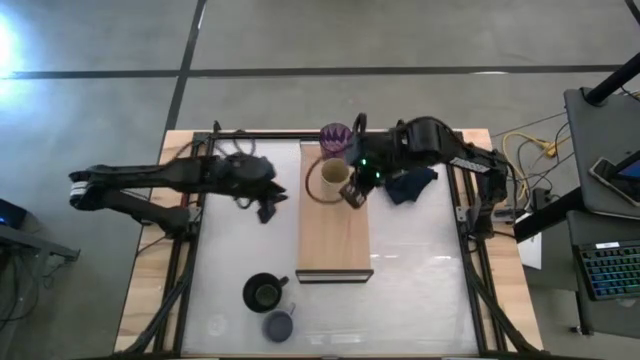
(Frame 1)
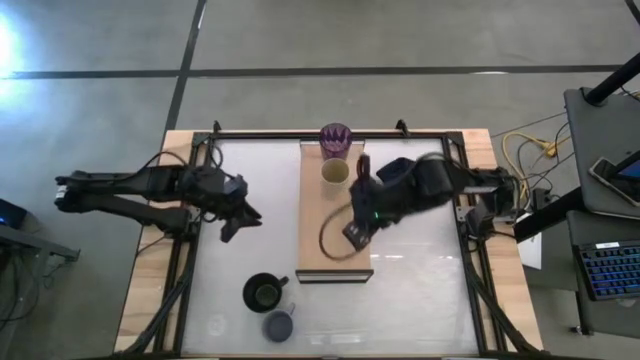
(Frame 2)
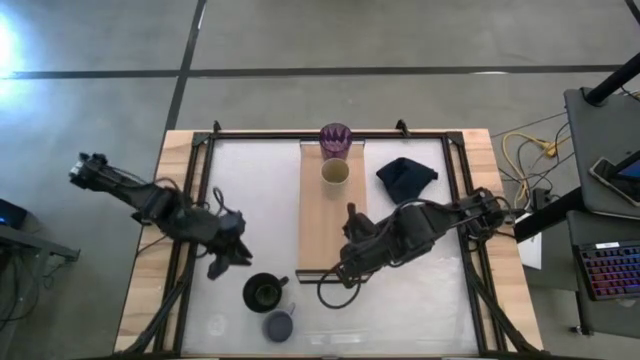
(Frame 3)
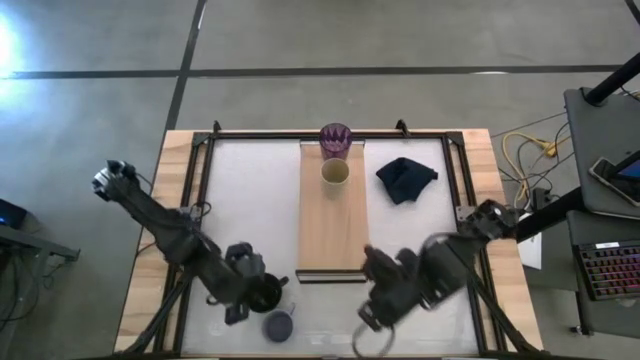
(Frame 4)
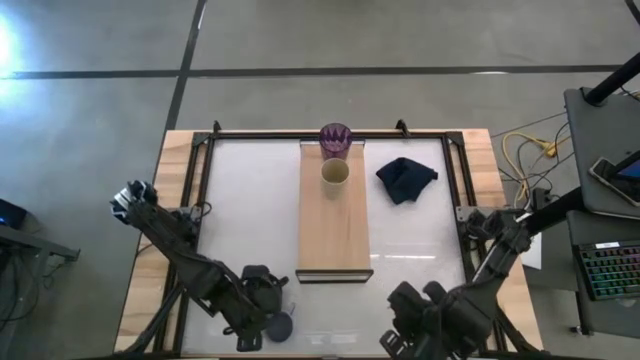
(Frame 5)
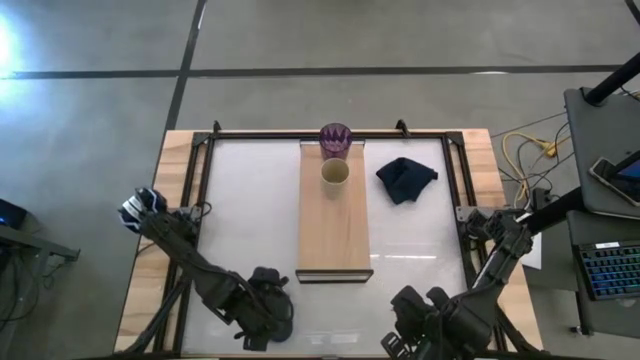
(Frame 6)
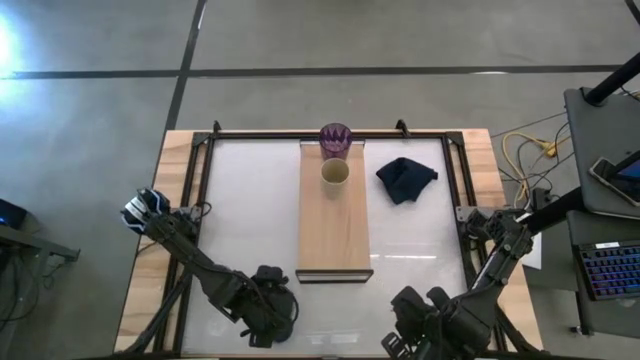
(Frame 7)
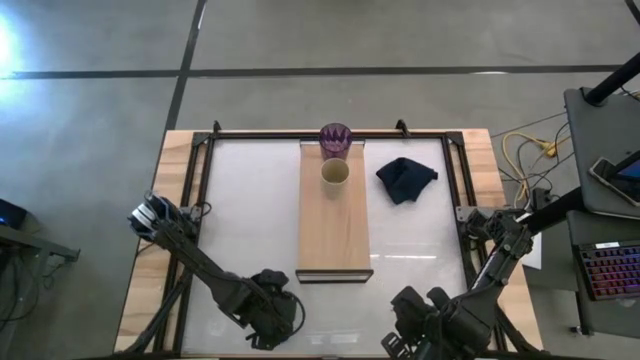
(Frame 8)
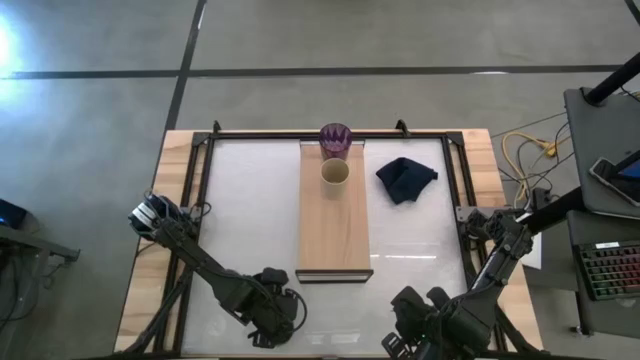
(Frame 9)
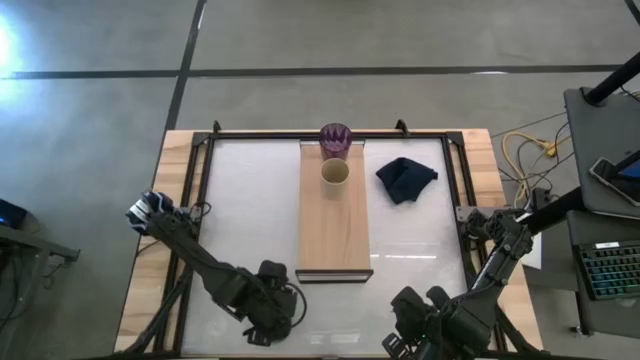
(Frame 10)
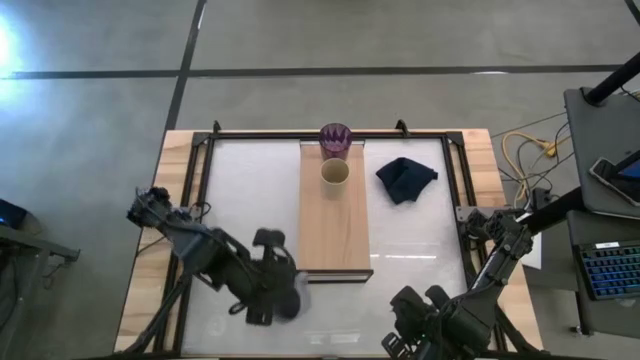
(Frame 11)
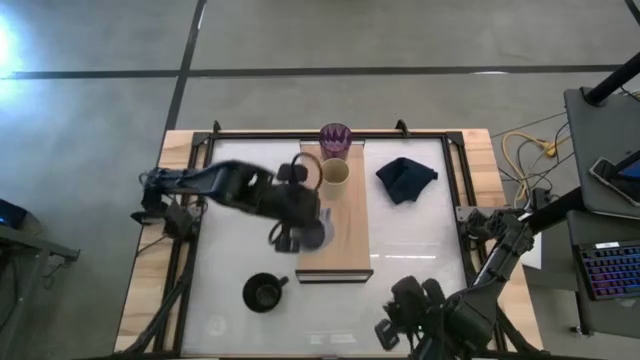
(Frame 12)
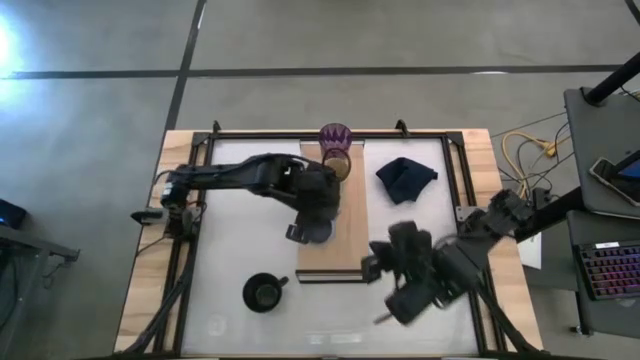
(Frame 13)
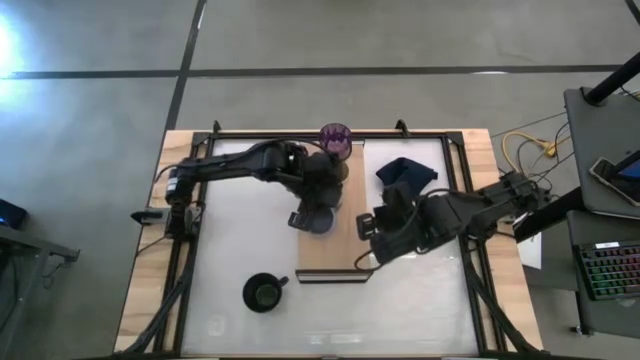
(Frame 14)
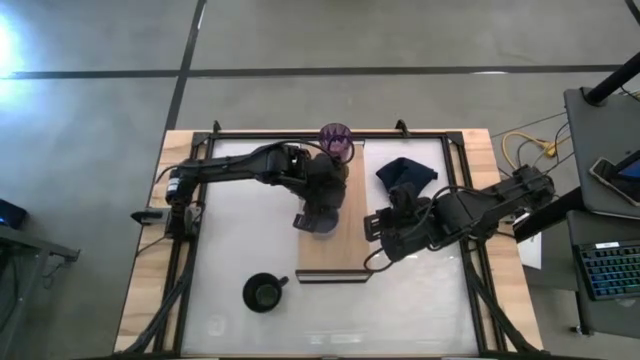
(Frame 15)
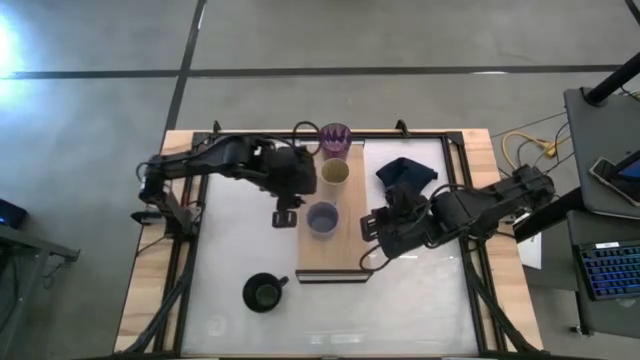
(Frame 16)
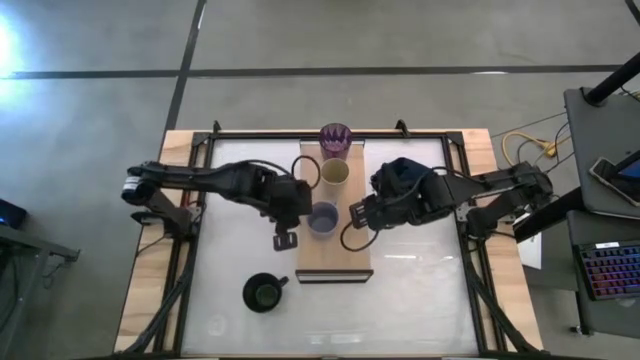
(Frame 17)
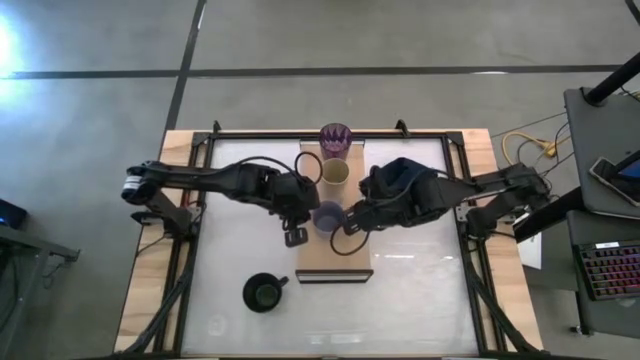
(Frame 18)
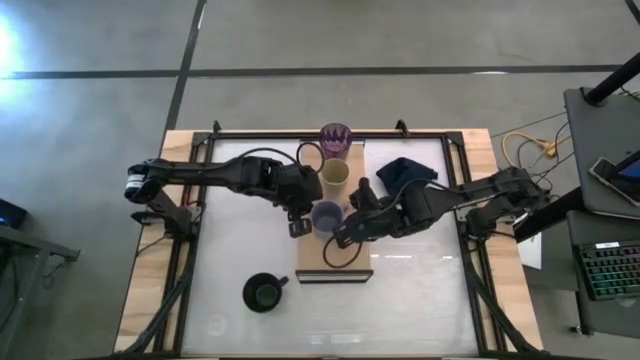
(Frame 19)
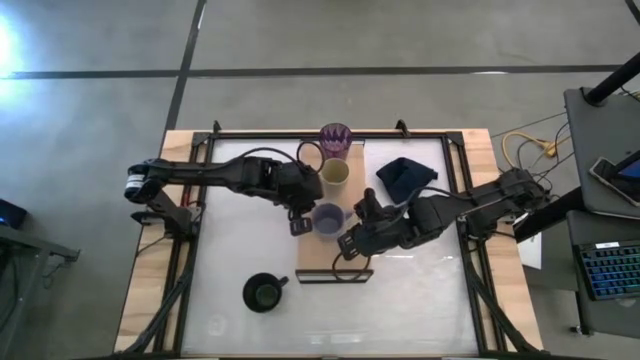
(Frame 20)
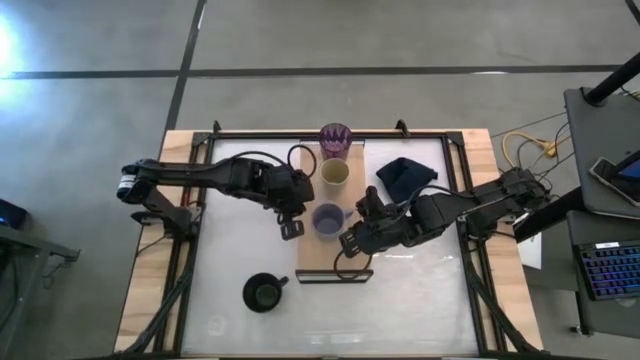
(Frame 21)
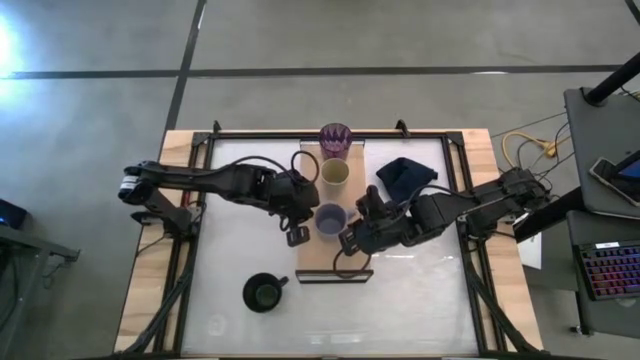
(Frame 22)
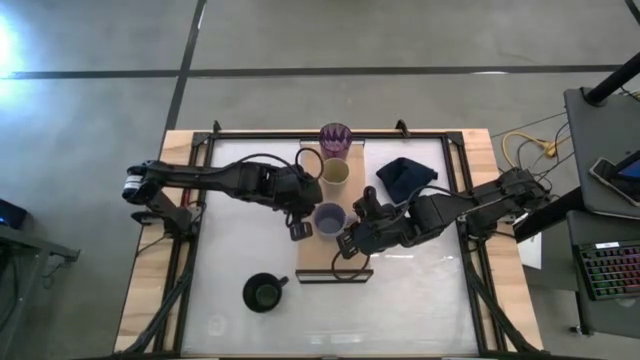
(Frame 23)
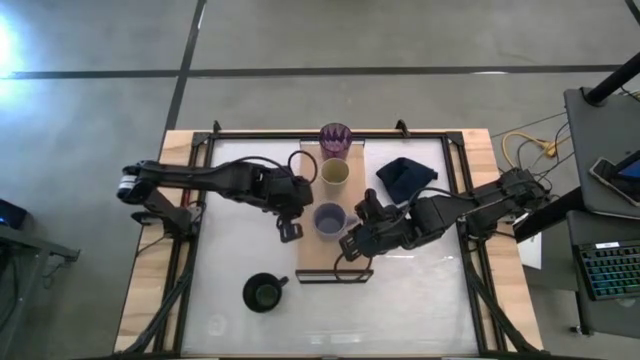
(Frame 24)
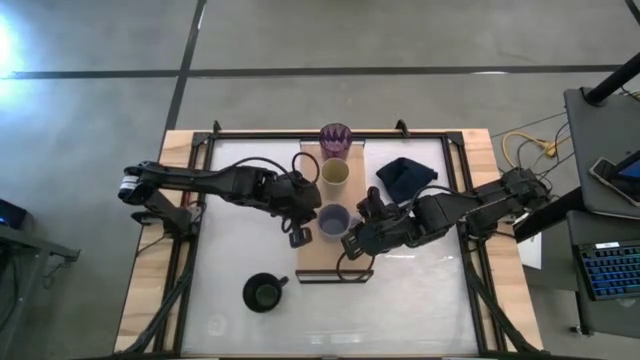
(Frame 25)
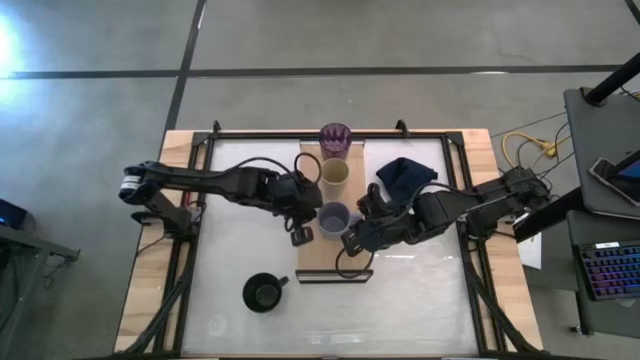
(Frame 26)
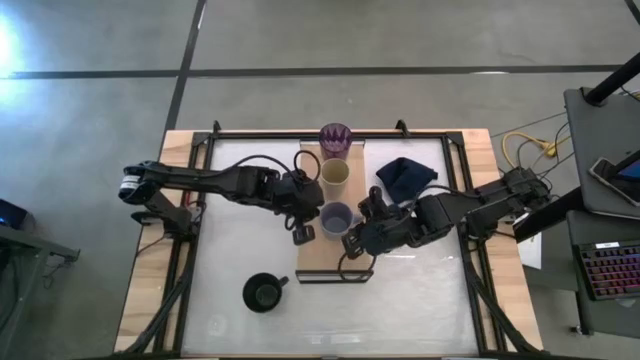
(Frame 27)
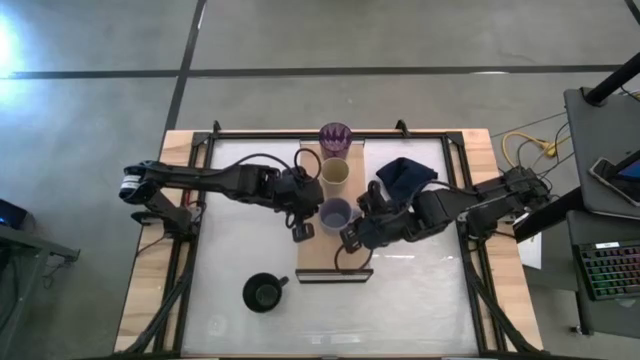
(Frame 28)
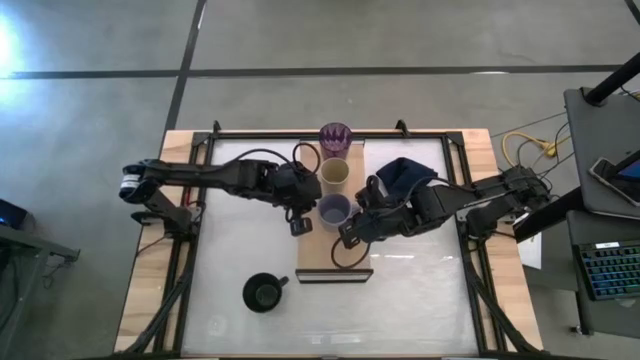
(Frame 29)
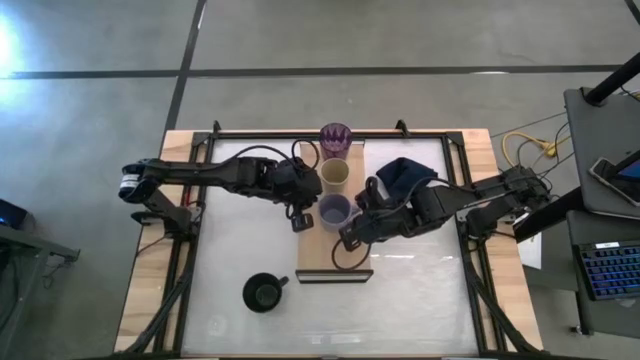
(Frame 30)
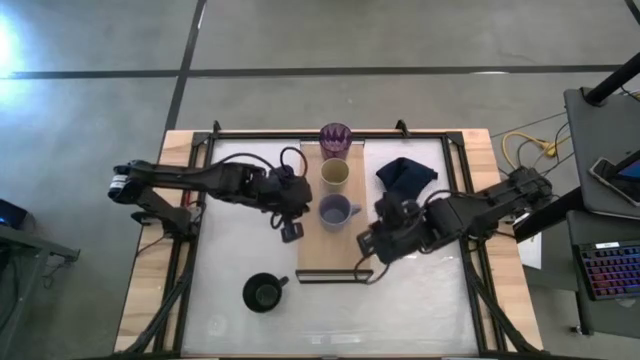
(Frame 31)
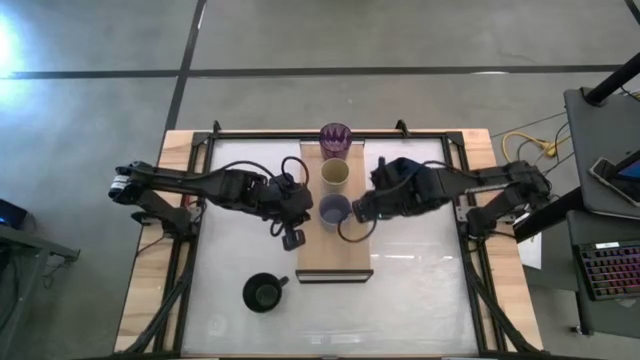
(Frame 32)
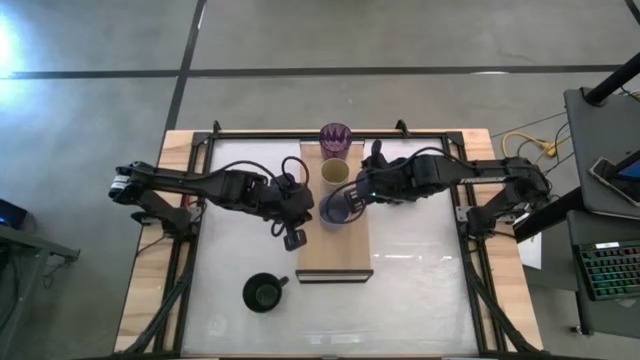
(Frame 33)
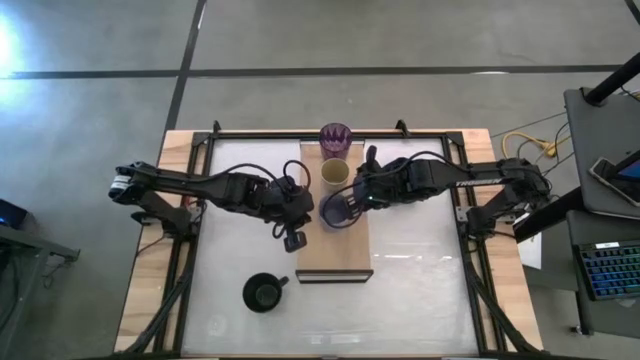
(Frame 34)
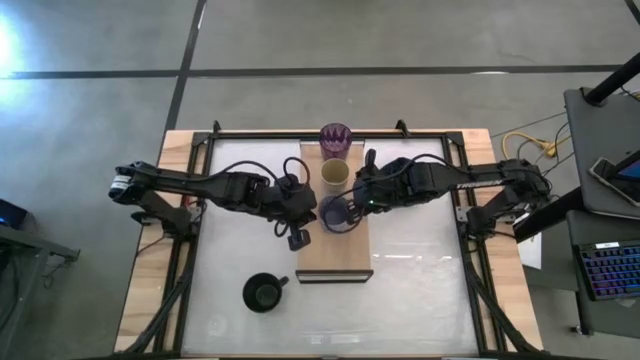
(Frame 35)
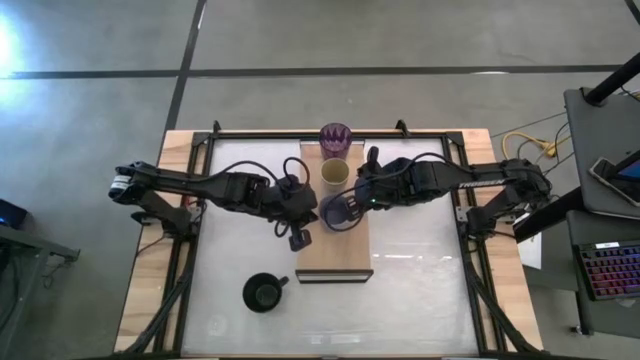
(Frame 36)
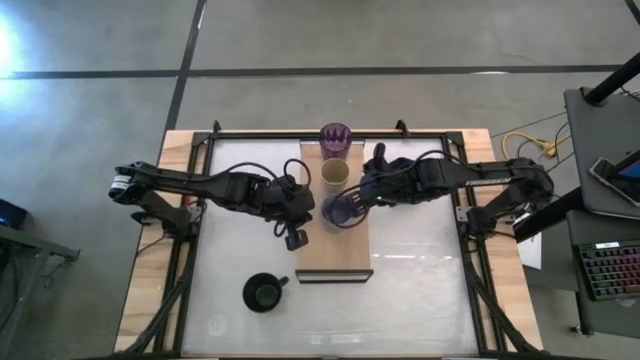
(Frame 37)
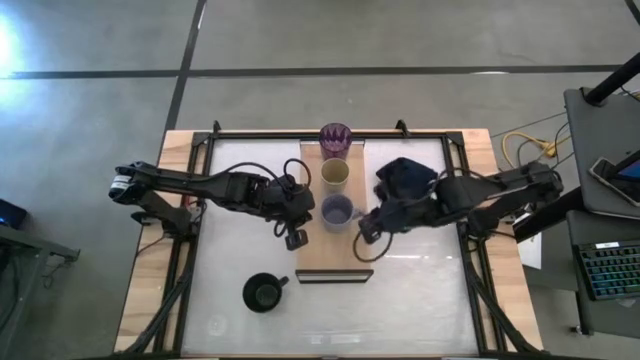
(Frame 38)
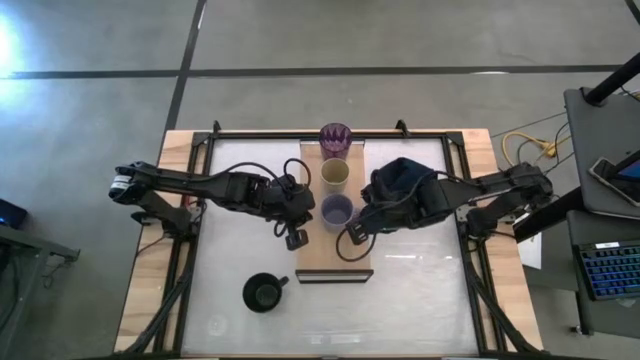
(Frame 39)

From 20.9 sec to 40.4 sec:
Task: Stack small to large cups/mugs on shelf
Put the light blue mug on the shelf

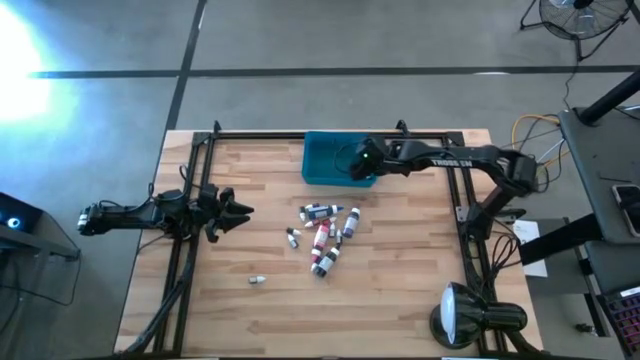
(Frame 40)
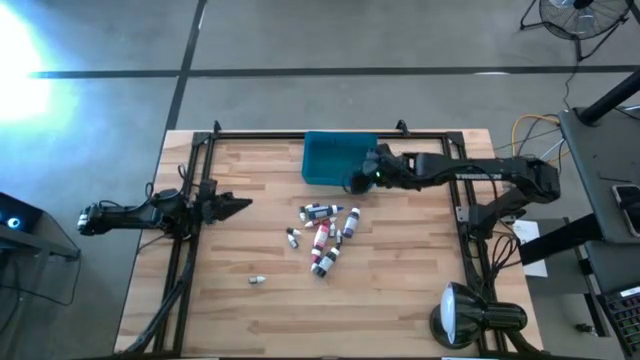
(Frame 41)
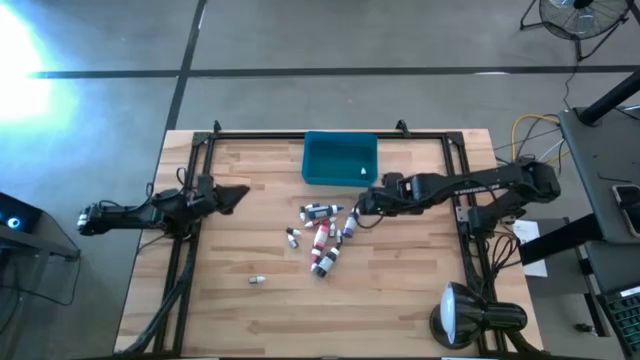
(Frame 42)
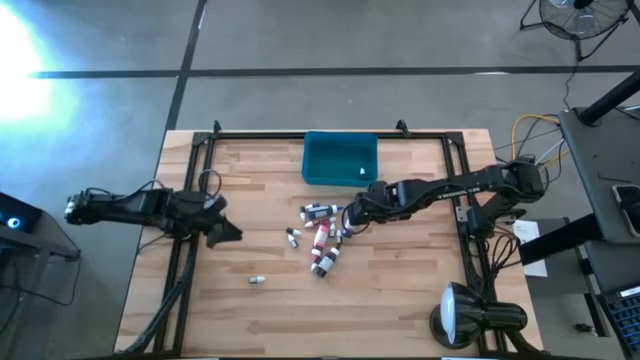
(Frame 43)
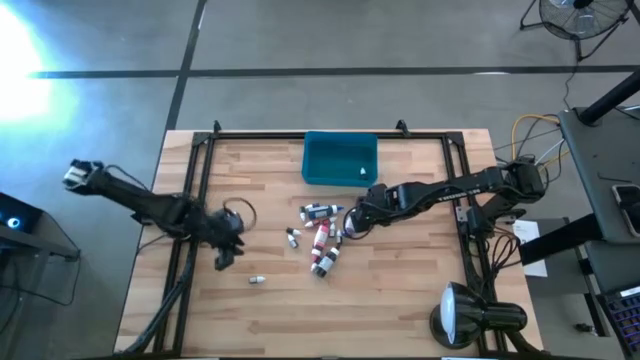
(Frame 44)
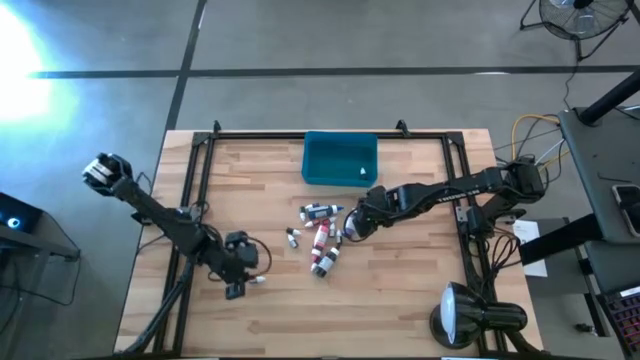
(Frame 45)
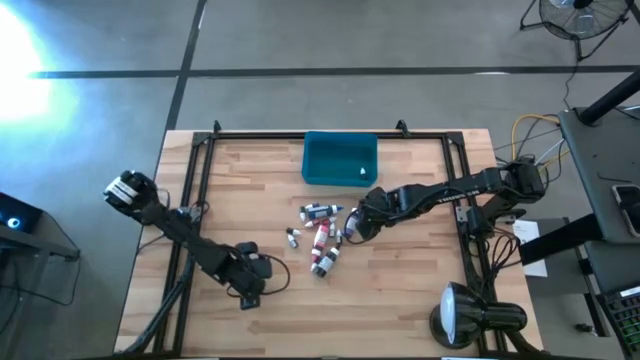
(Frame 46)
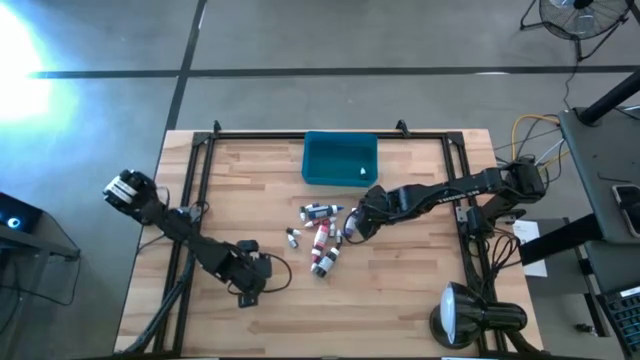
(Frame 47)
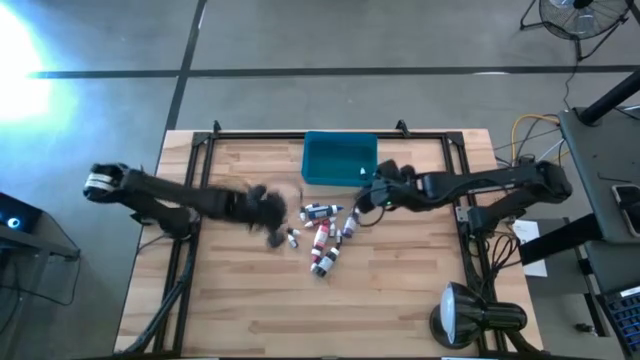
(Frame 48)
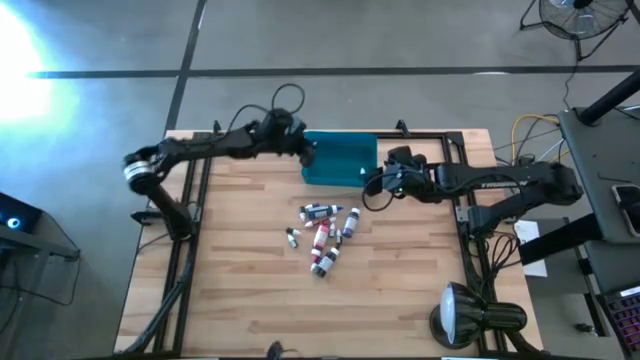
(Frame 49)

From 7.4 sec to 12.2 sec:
Task: Pick & Place food coloring
Put the small brown food coloring bottle into the blue bin
